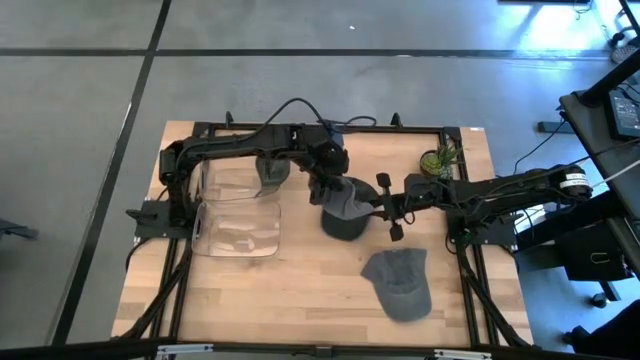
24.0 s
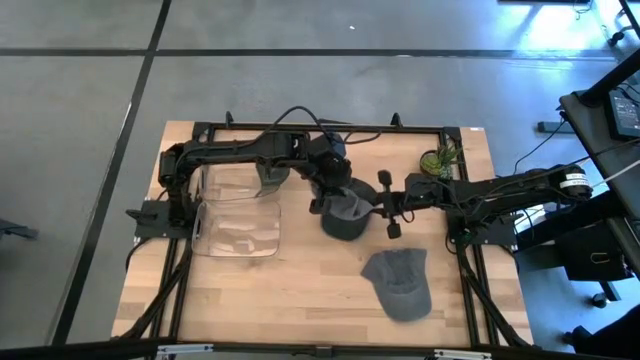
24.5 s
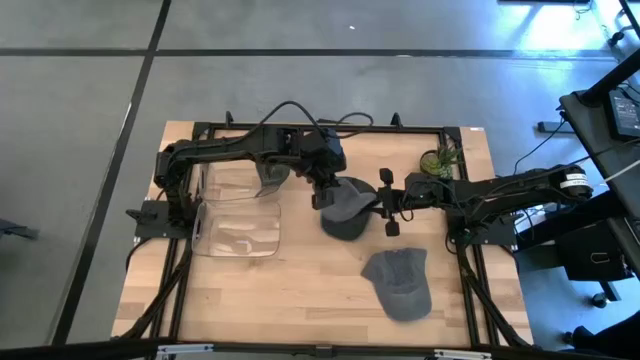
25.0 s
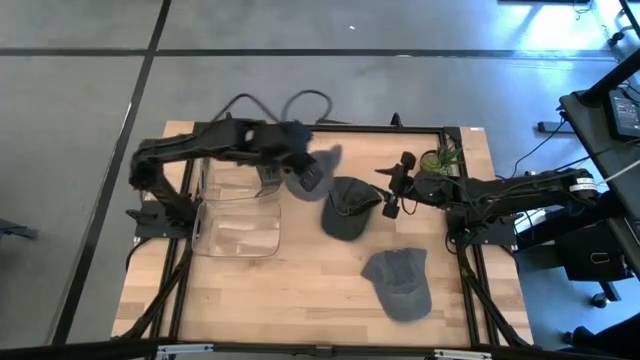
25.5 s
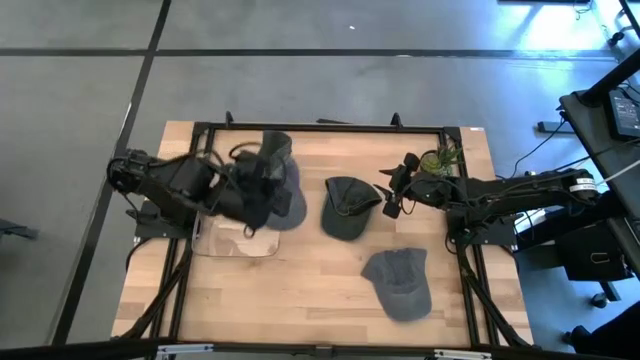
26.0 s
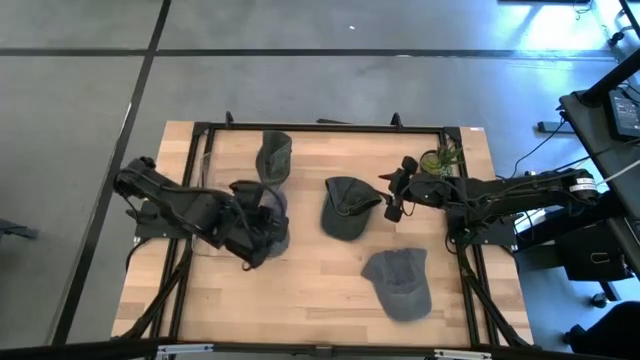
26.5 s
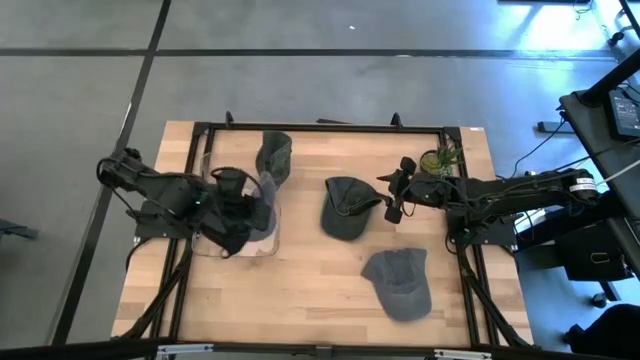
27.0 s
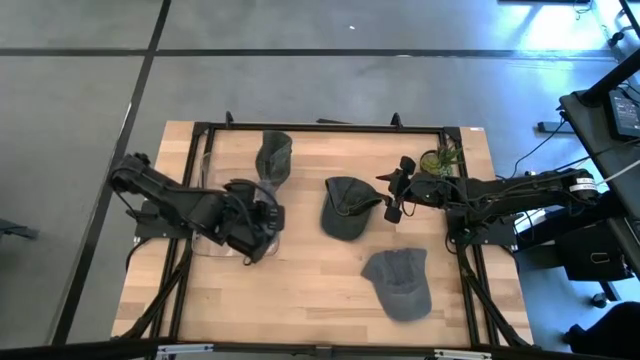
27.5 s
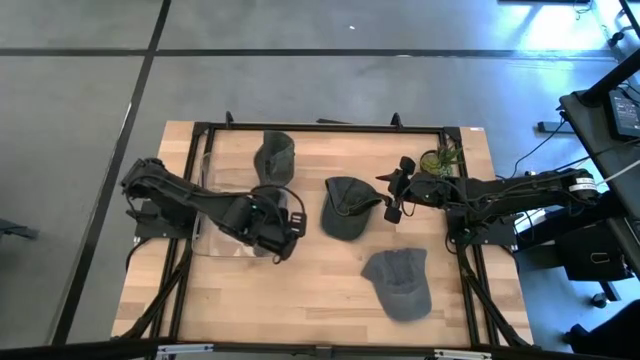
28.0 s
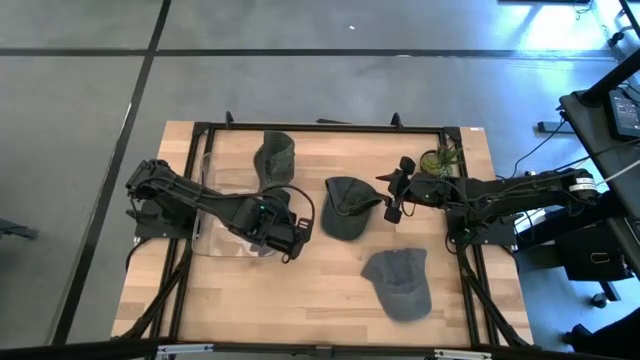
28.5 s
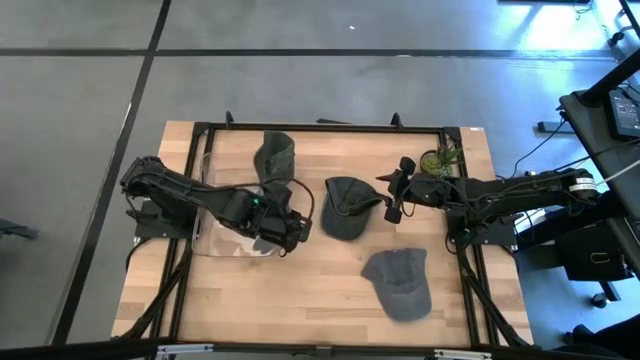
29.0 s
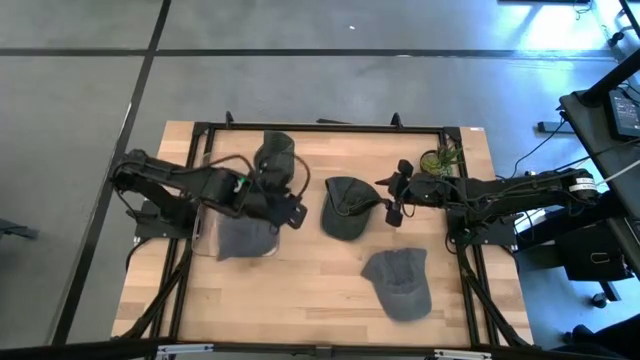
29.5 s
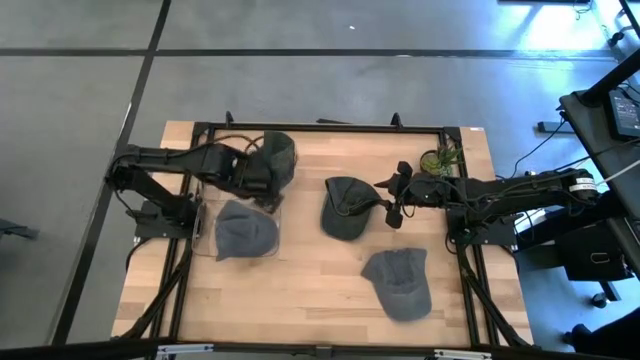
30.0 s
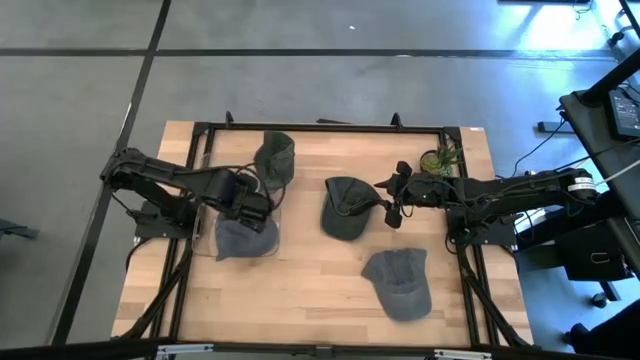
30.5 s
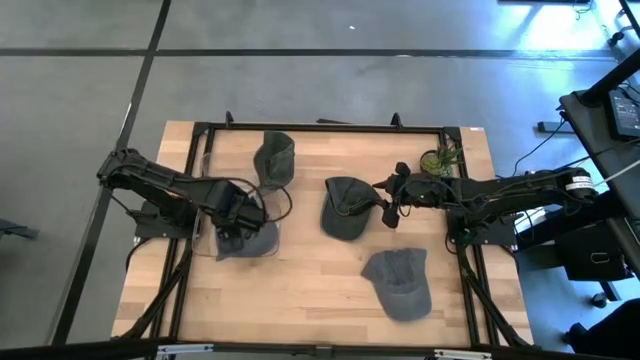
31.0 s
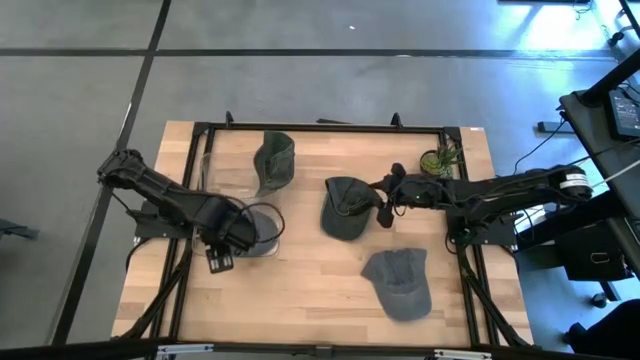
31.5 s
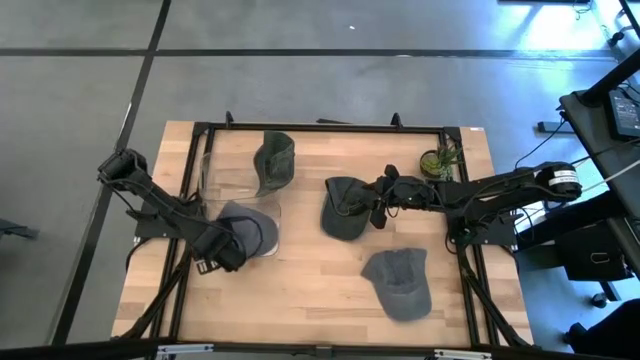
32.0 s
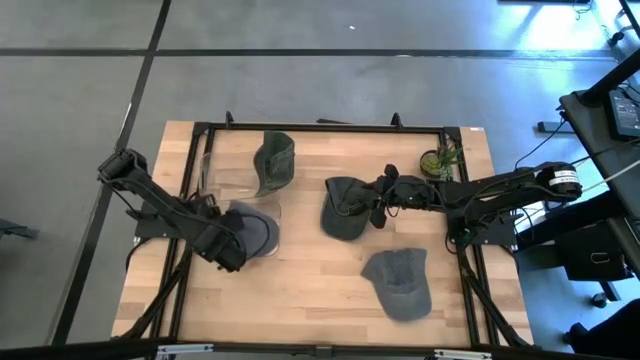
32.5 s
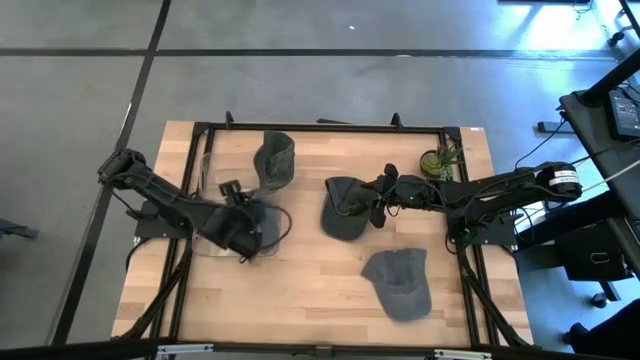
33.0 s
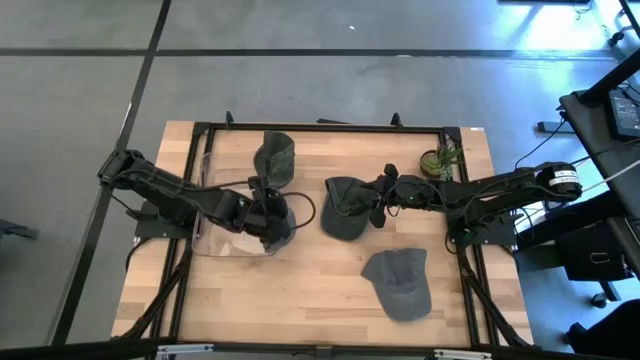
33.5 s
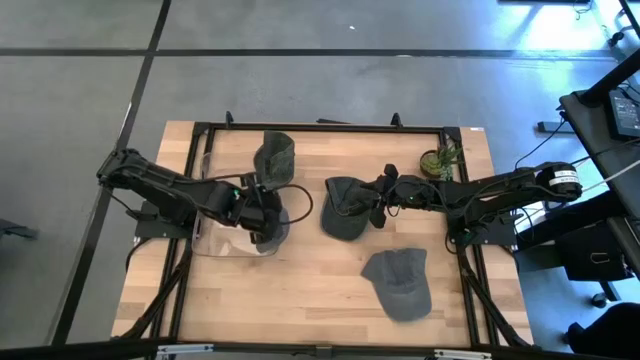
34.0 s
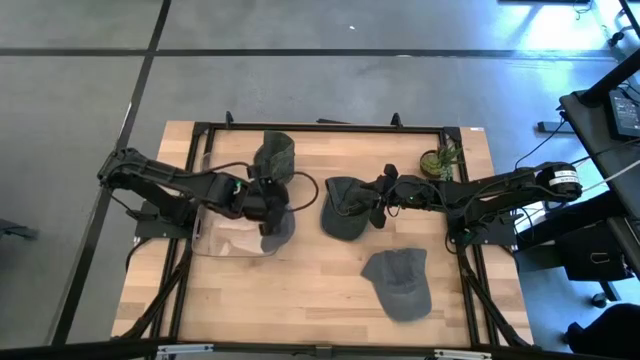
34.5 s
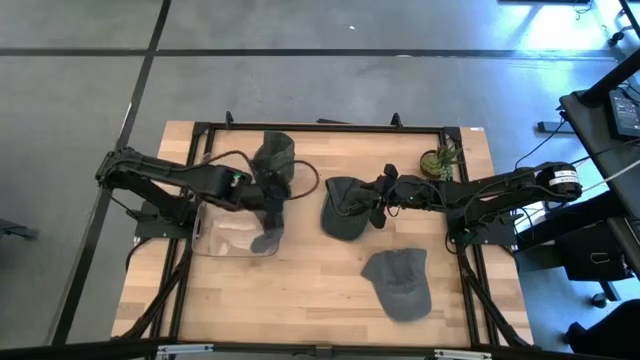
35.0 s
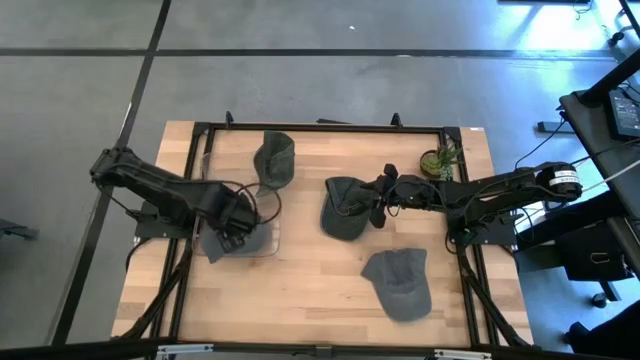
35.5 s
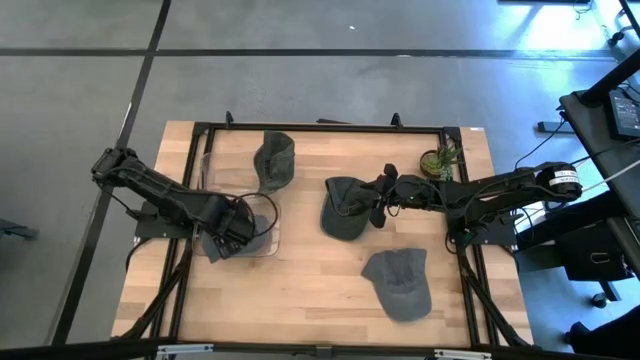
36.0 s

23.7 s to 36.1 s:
Task: Pick & Place hat
Put the left gray cap into the bottom transparent bin

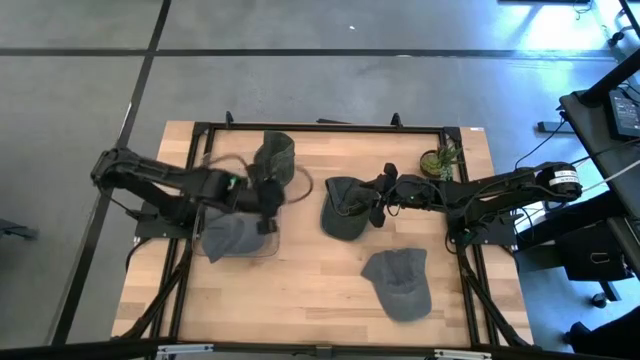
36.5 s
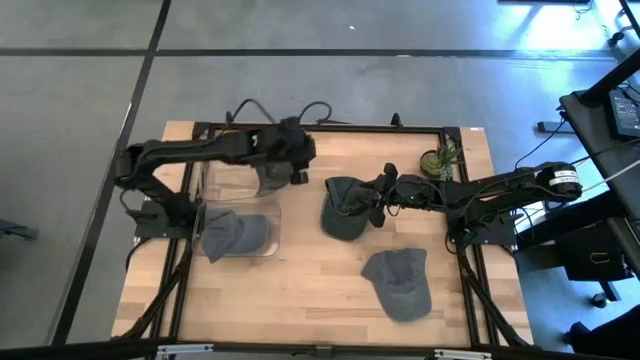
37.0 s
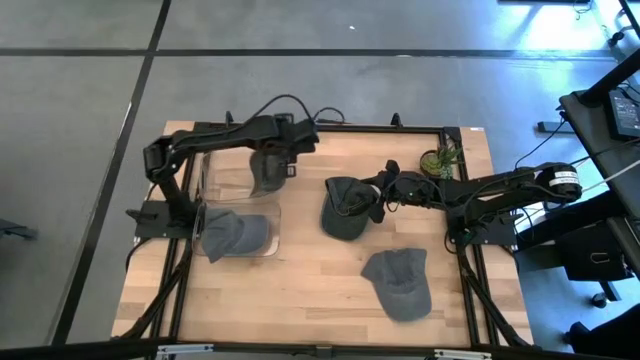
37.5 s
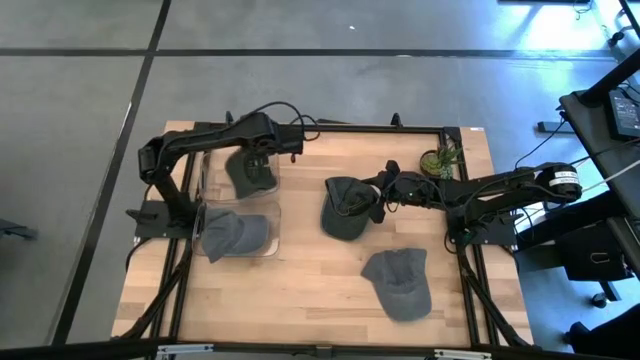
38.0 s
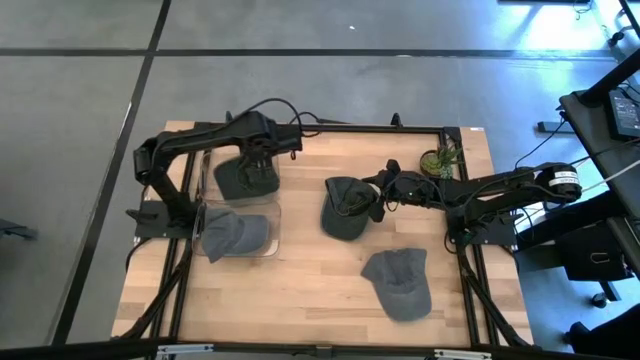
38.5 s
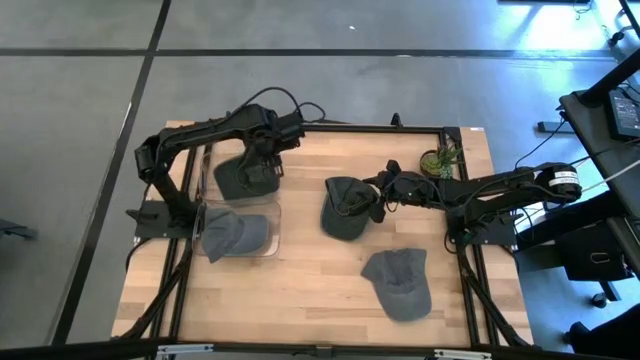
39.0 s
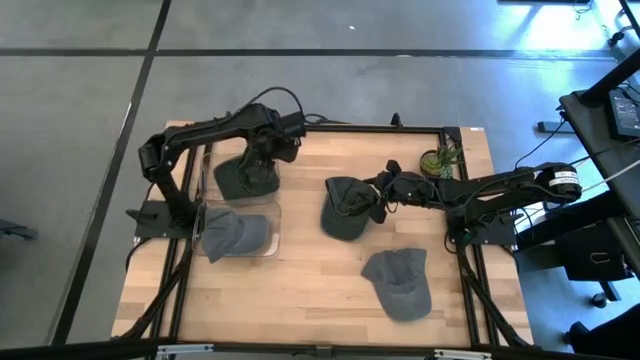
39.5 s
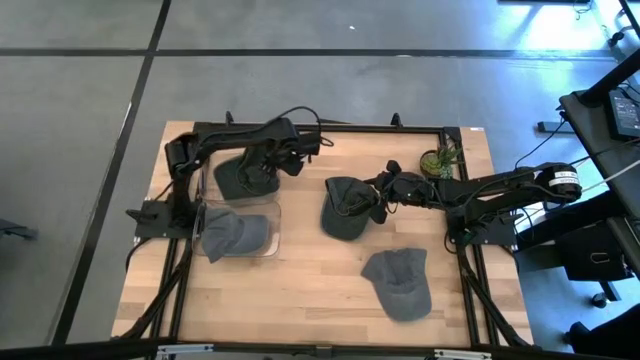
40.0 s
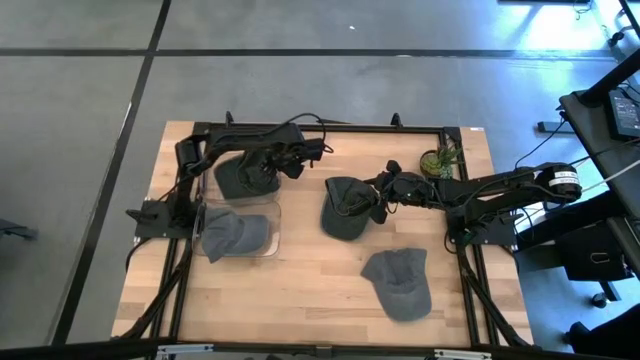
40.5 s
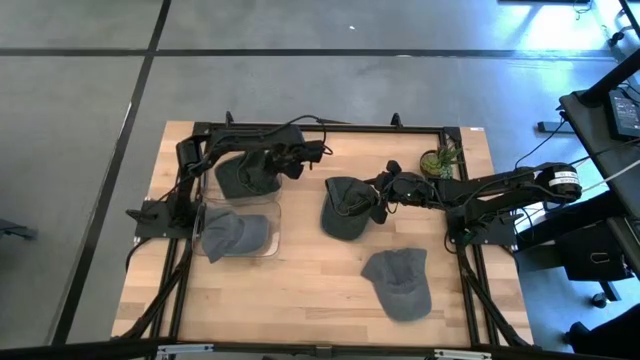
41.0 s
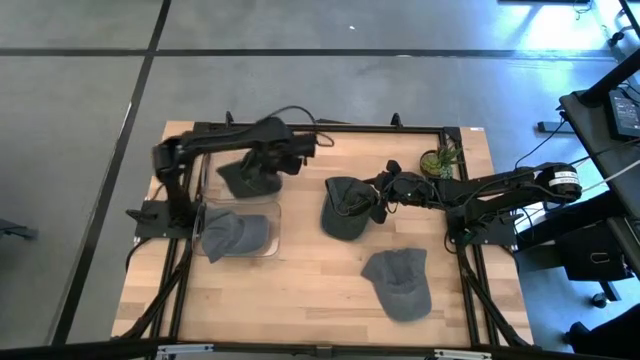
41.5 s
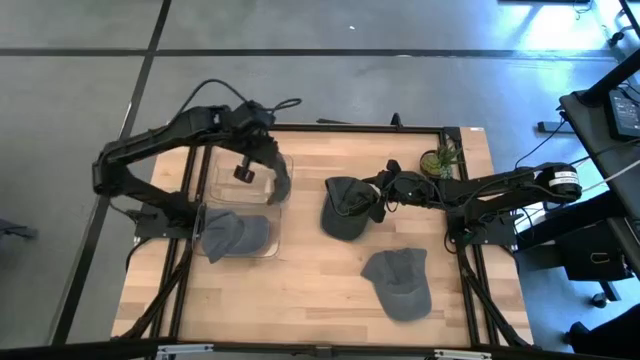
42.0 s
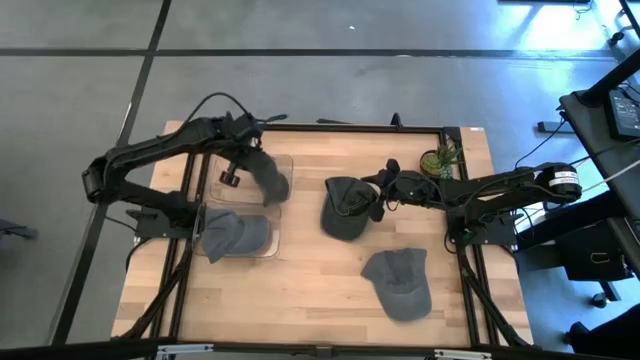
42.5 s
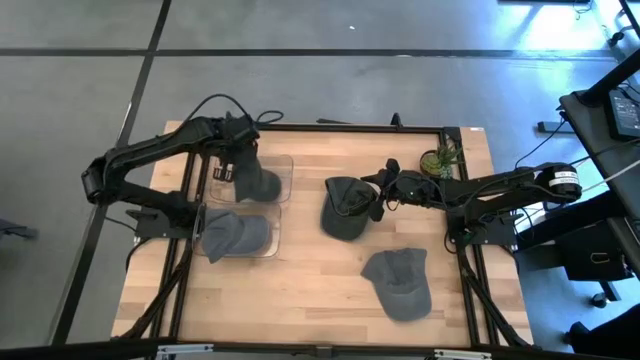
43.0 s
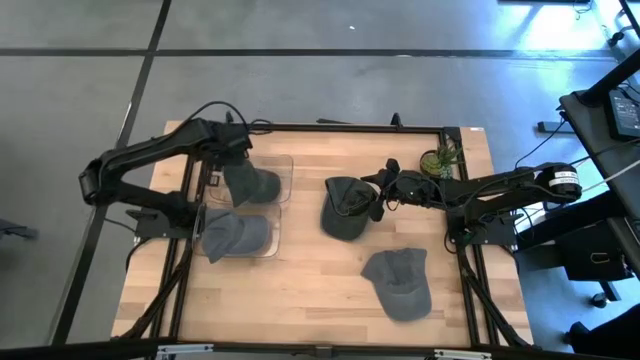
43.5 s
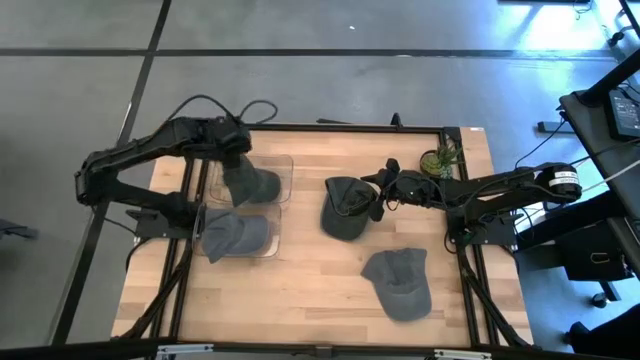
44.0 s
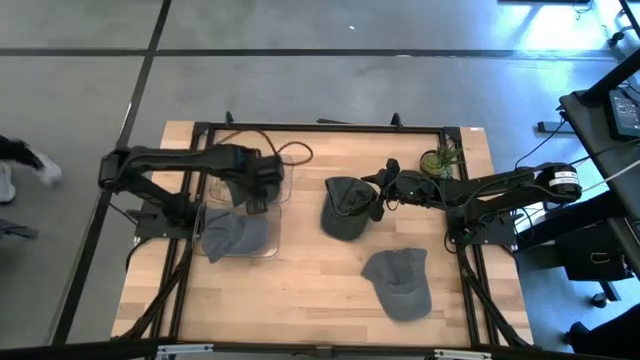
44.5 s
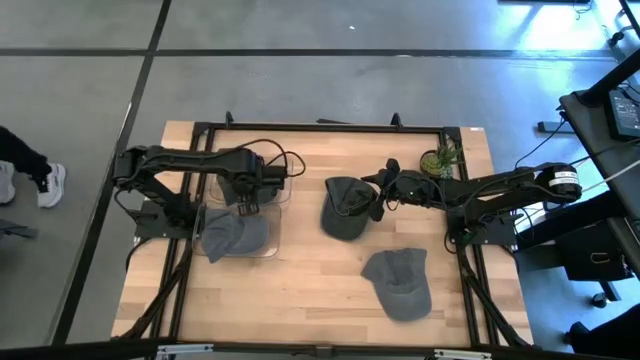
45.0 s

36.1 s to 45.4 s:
Adjust the black cap in the top transparent bin
